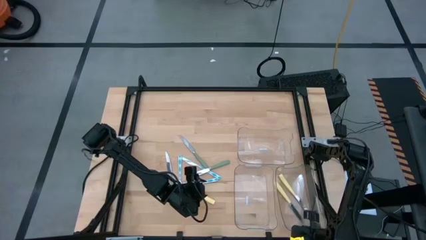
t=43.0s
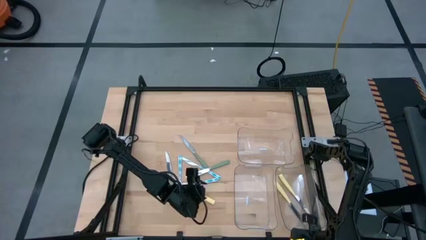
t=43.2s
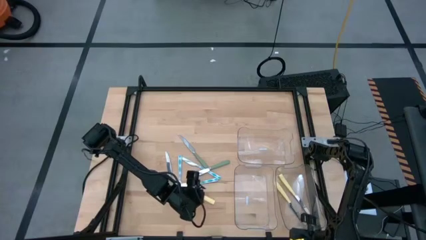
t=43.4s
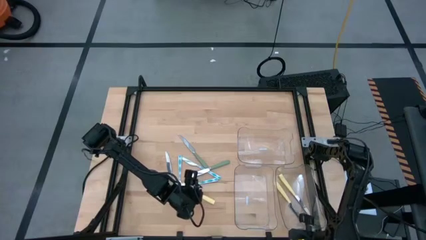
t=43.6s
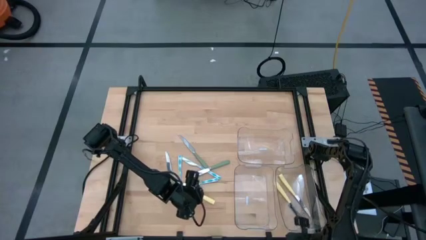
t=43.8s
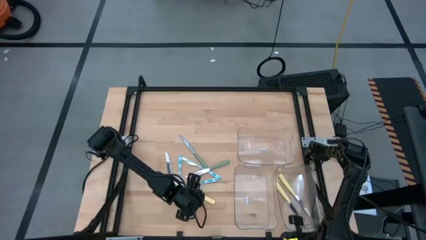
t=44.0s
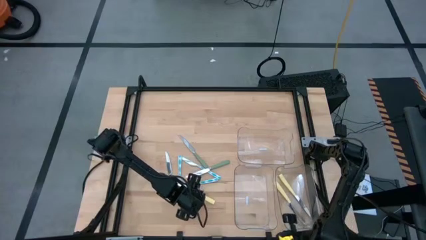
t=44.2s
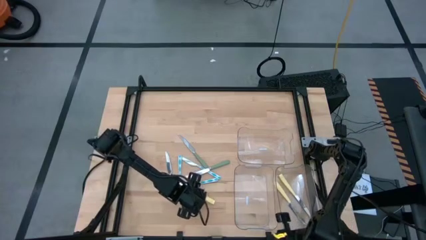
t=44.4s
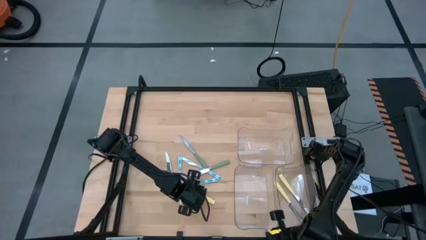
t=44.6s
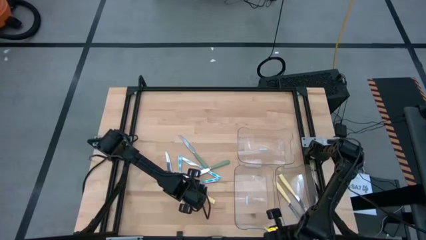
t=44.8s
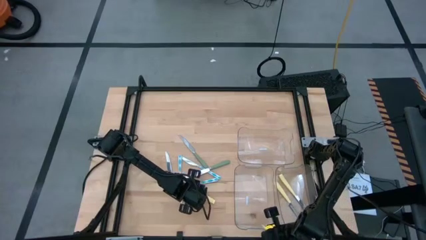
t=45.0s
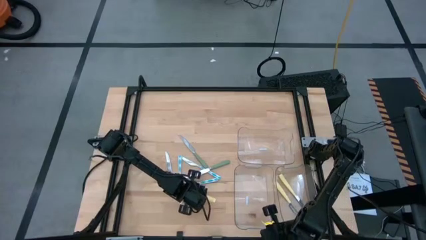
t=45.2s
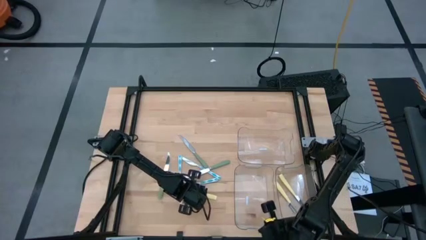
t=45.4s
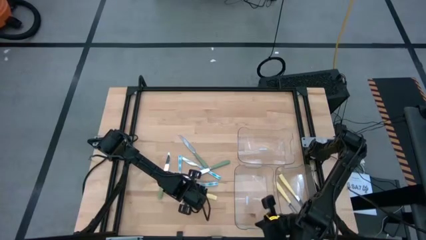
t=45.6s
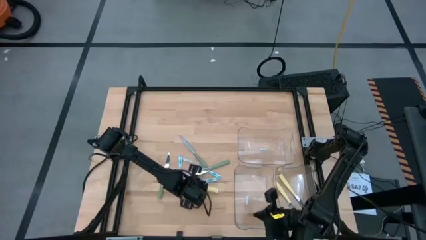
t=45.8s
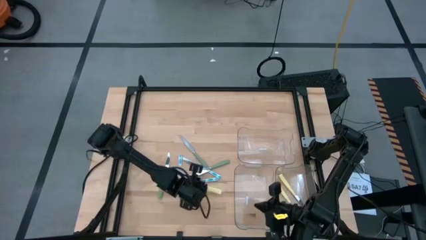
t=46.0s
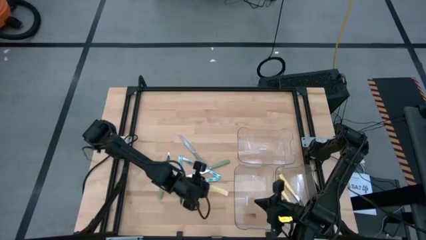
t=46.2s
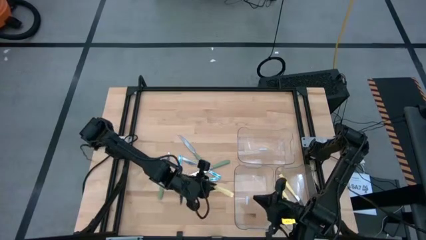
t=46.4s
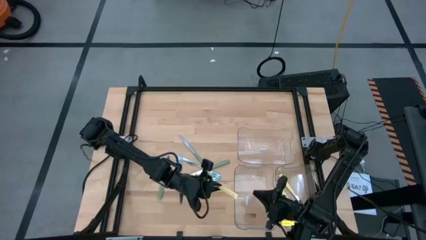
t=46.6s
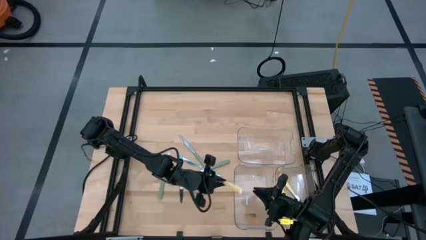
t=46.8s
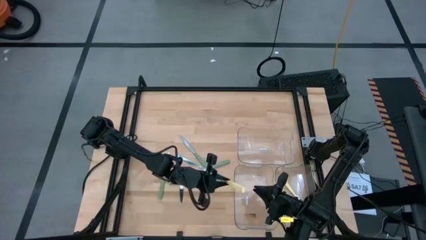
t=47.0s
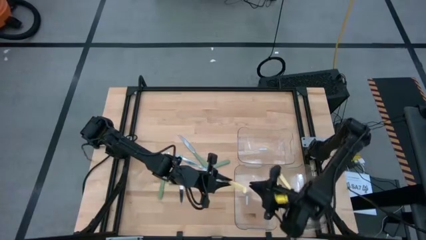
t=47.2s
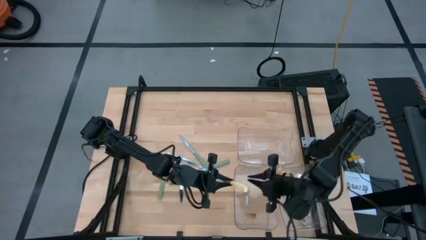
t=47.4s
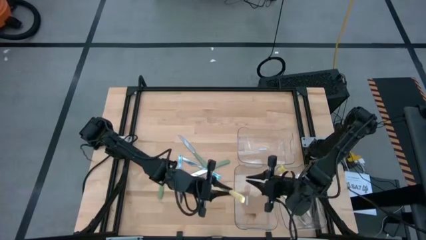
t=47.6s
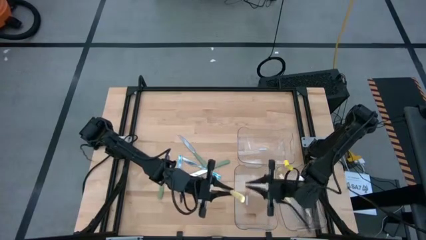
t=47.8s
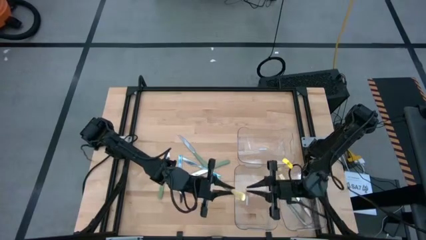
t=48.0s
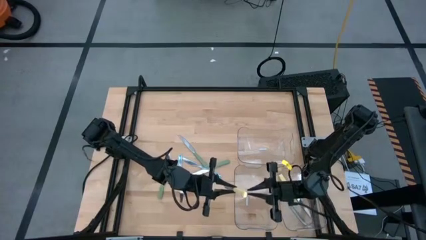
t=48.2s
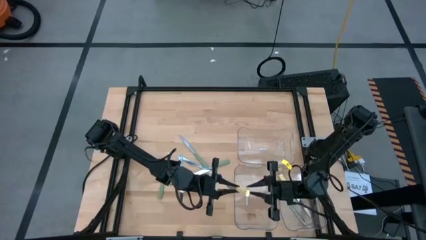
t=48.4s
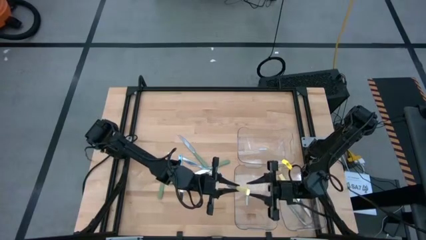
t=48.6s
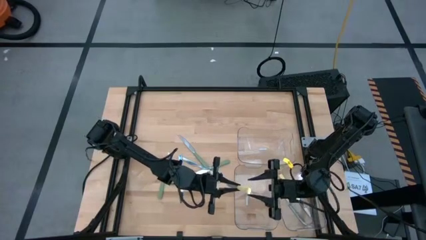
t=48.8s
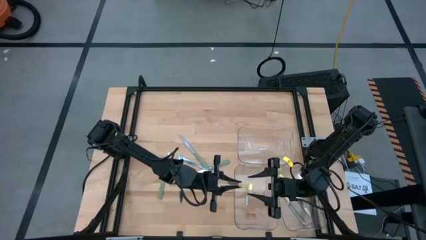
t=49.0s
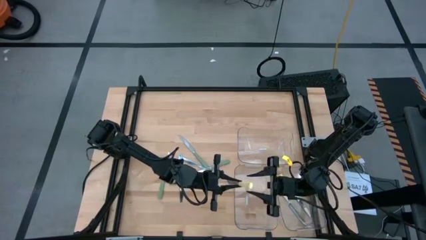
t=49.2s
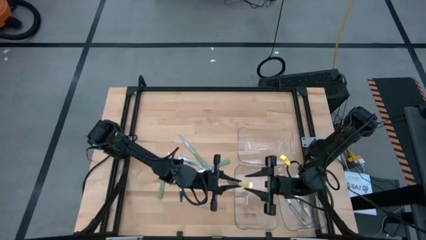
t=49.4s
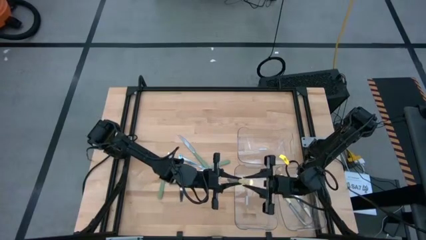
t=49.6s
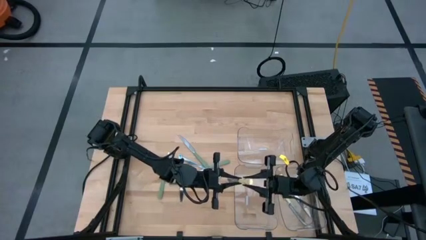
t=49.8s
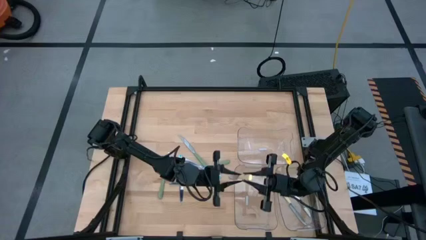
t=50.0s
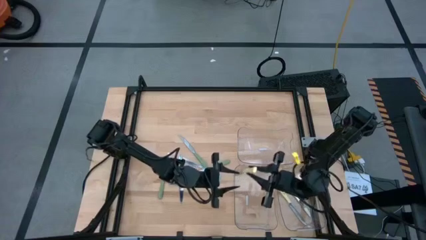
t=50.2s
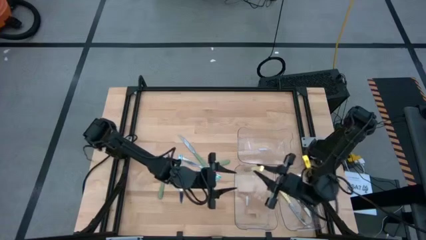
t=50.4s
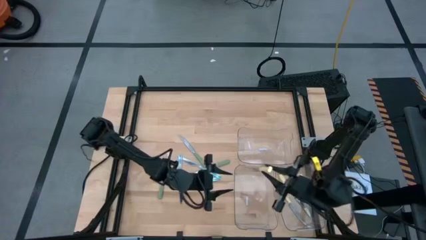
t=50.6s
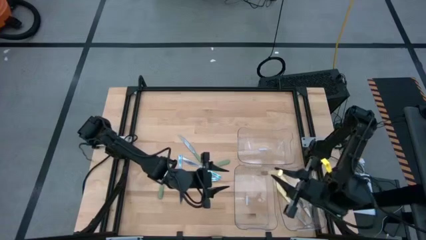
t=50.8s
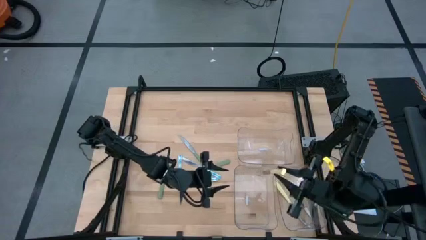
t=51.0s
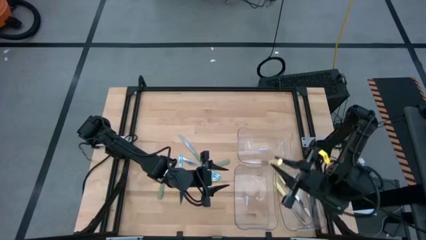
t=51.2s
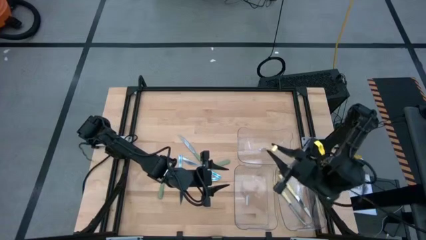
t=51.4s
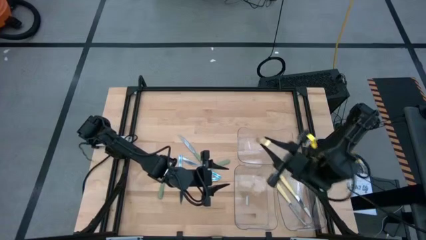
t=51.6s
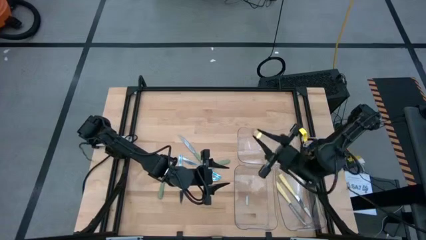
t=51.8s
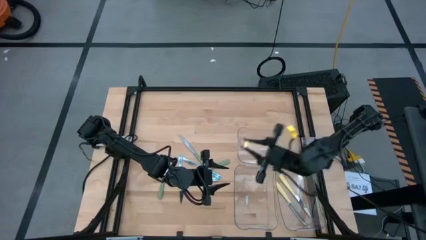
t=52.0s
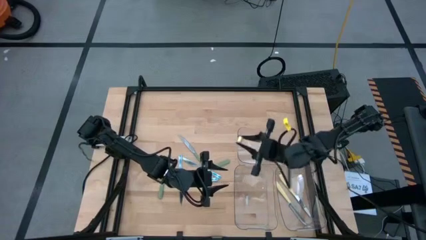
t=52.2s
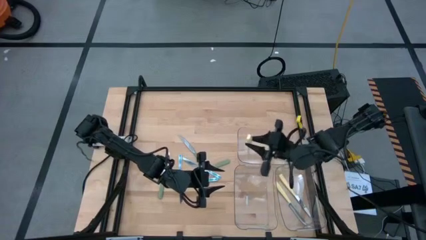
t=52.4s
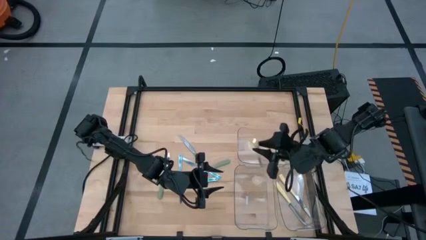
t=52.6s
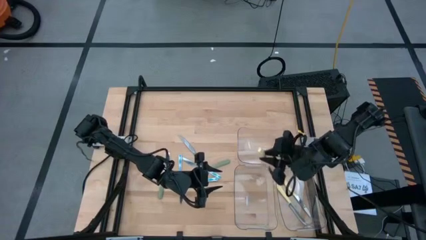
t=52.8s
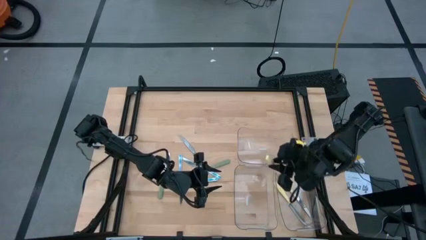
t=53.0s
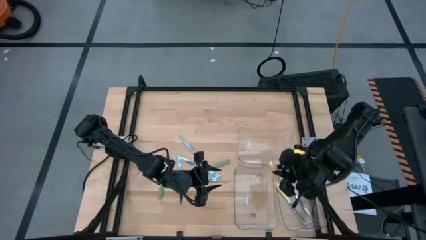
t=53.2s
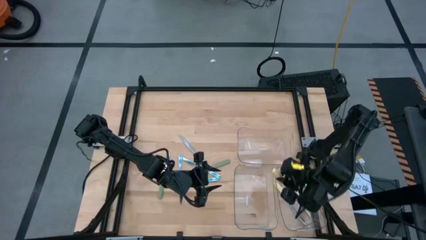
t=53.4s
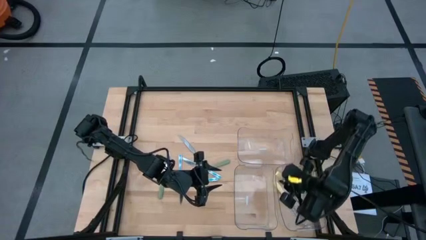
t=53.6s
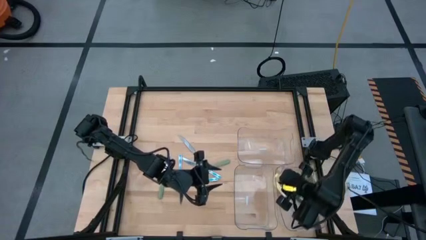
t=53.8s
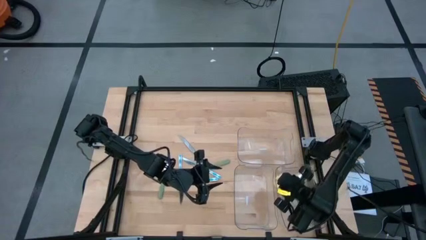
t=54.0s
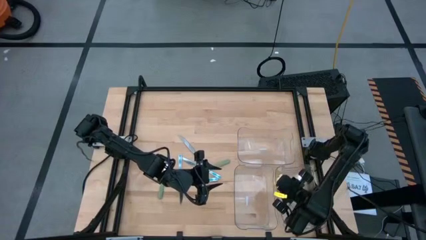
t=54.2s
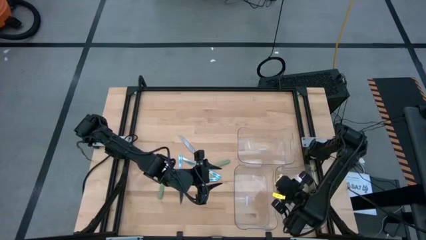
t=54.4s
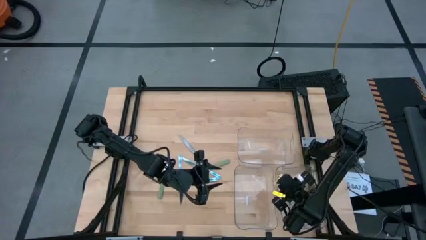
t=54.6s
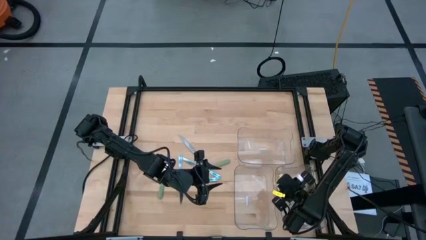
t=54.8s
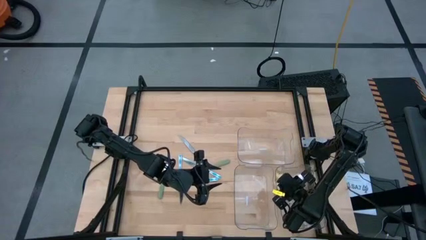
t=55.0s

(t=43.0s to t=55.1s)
Task: Sort silverware by color (type)
Put the yellow knife into the bottom right transparent bin

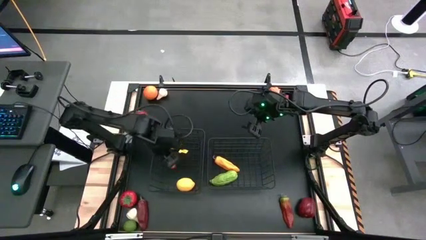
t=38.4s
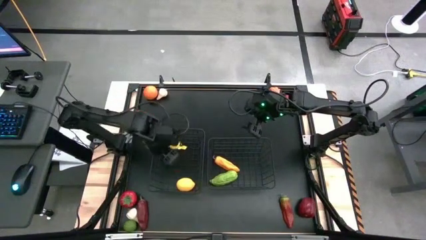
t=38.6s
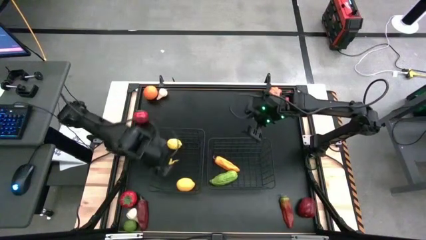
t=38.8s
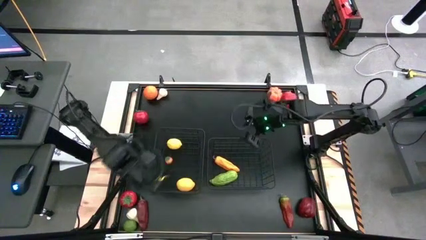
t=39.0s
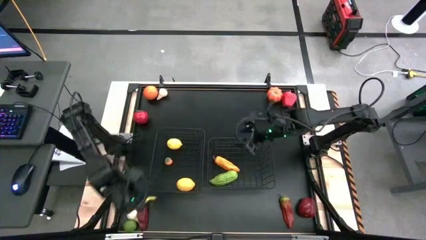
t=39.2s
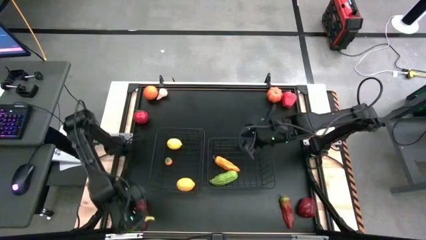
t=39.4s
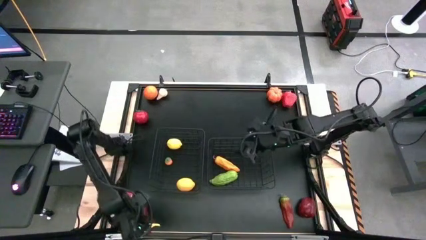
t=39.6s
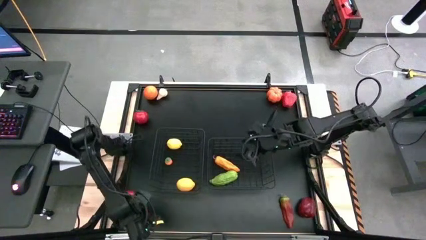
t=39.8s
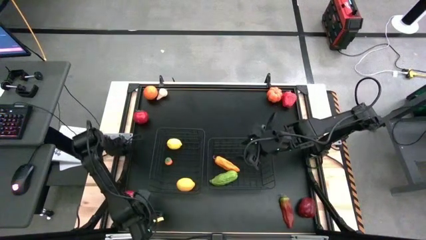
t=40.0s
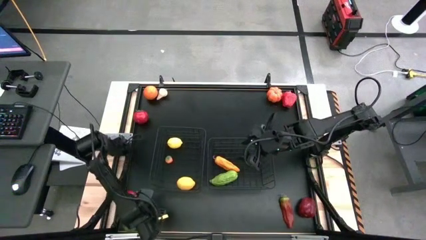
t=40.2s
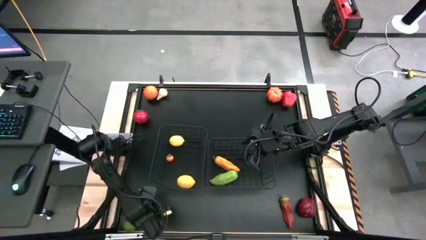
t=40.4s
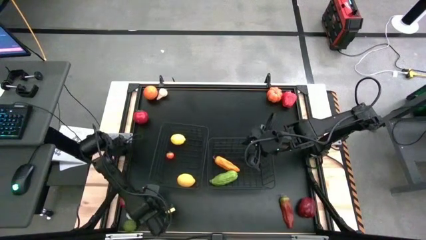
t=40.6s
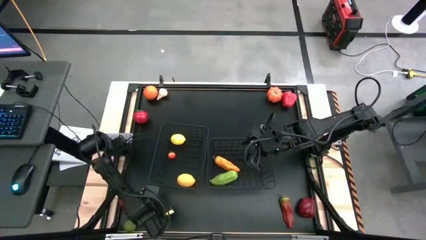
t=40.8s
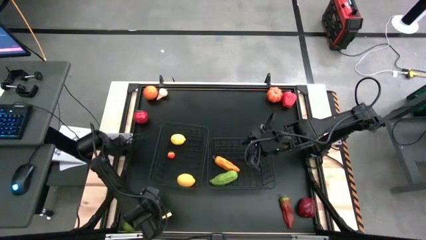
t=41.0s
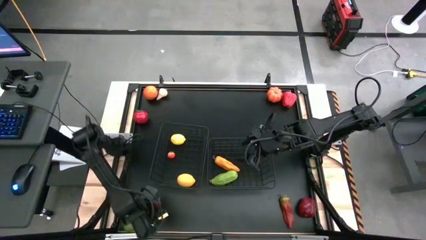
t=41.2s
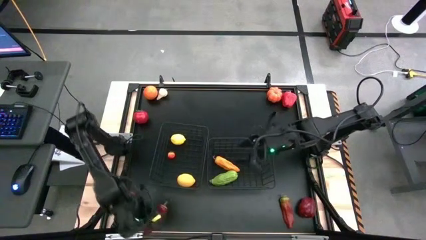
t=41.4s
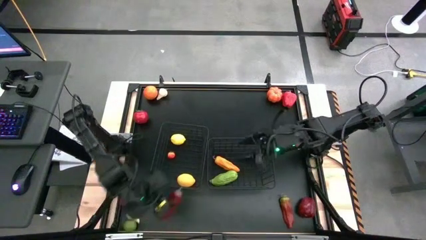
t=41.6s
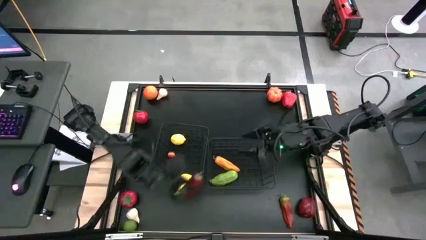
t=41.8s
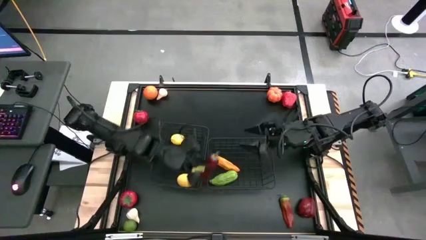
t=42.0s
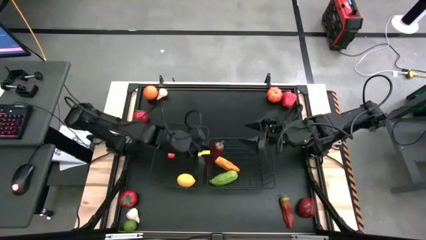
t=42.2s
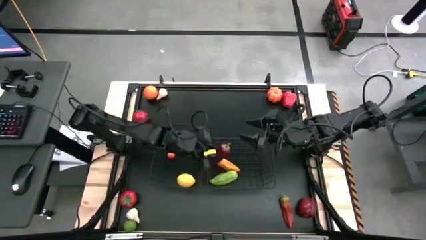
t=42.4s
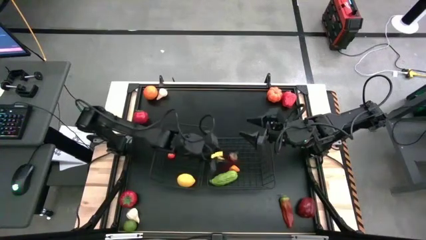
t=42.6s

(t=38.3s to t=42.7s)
Task: Sort produce into baskets
Put the left red chili pepper into the right wire basket
